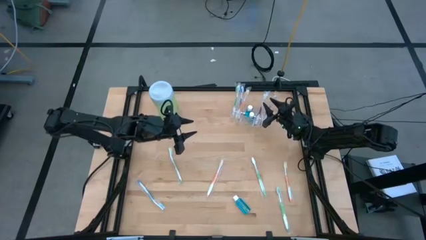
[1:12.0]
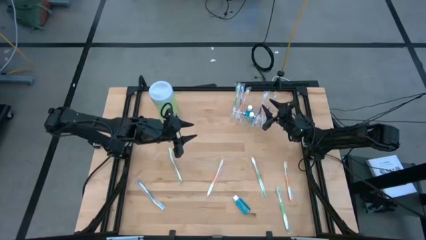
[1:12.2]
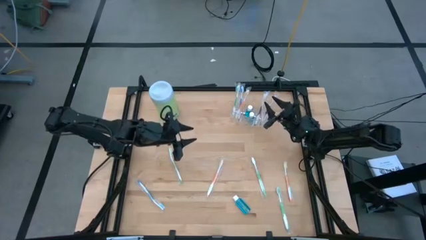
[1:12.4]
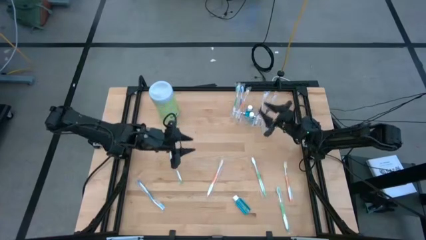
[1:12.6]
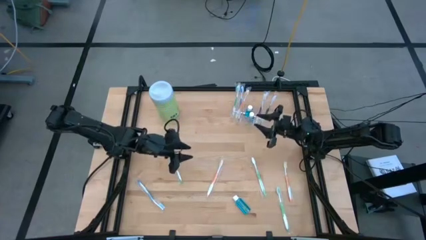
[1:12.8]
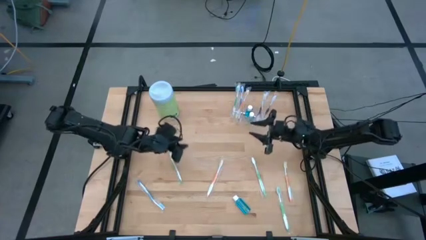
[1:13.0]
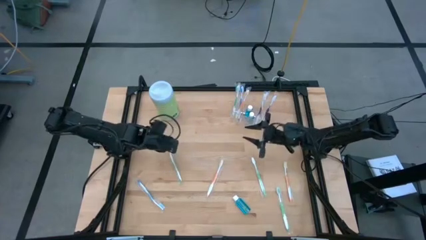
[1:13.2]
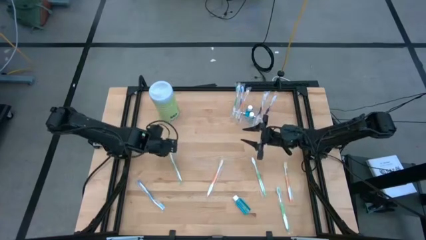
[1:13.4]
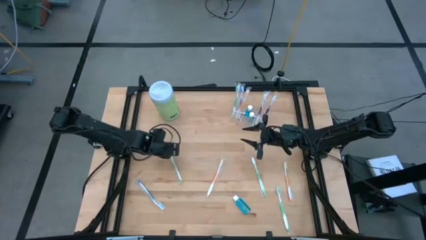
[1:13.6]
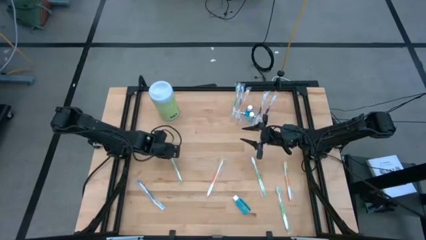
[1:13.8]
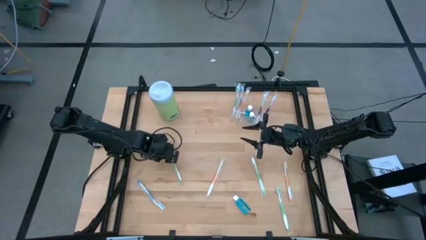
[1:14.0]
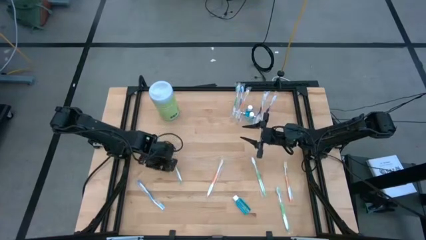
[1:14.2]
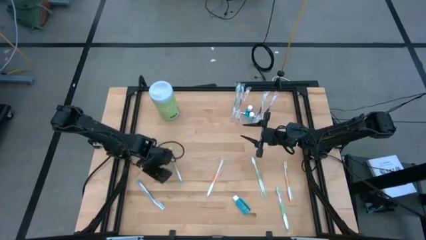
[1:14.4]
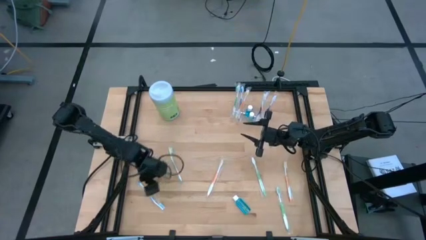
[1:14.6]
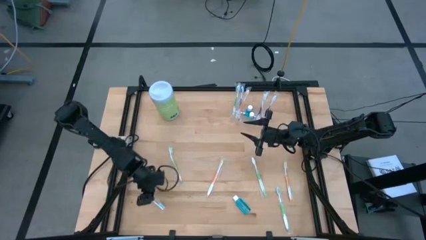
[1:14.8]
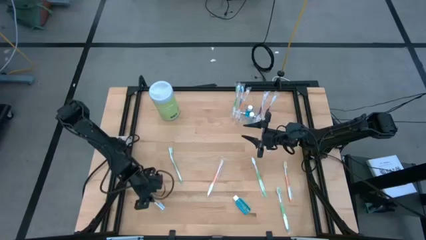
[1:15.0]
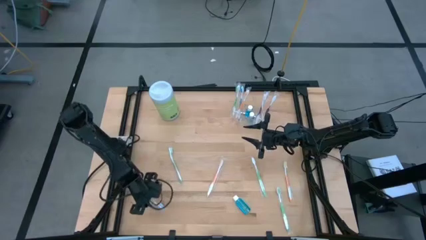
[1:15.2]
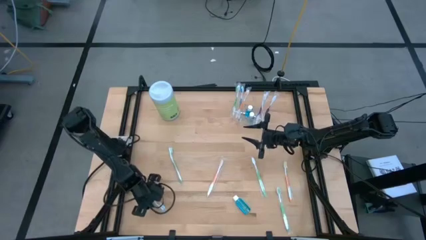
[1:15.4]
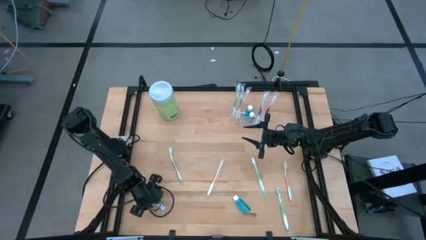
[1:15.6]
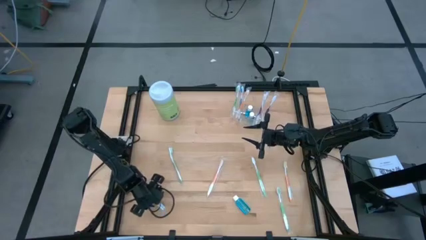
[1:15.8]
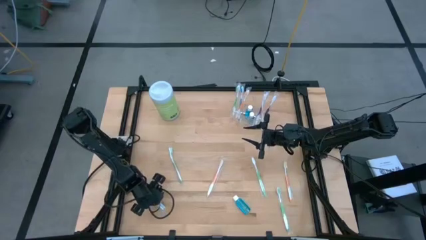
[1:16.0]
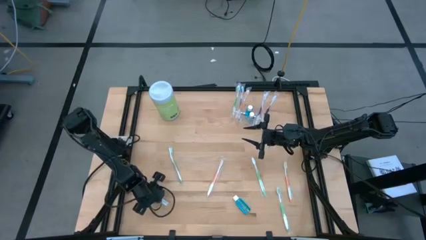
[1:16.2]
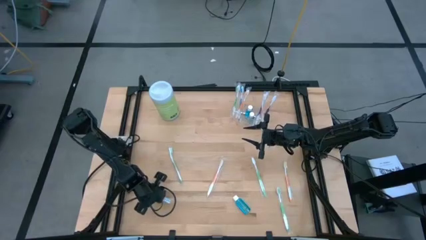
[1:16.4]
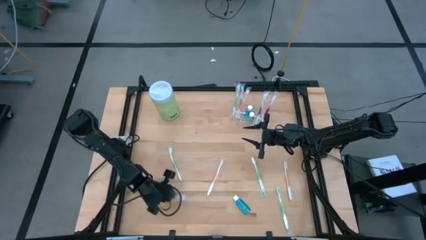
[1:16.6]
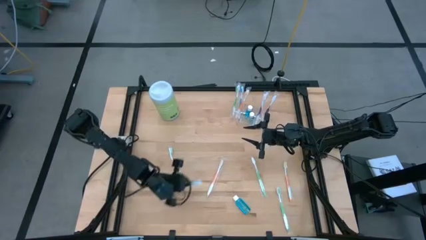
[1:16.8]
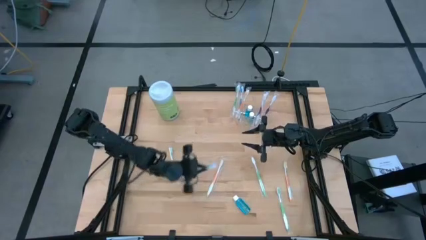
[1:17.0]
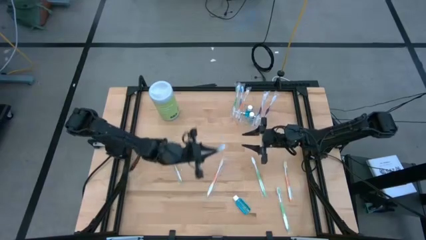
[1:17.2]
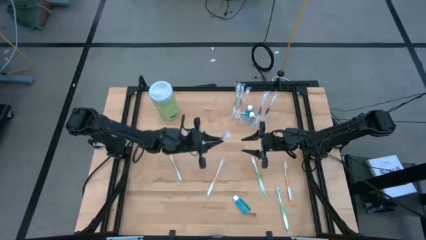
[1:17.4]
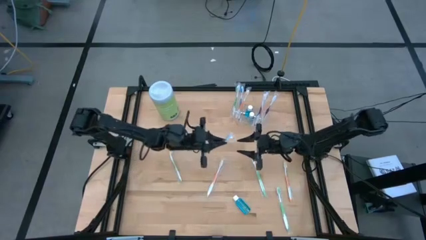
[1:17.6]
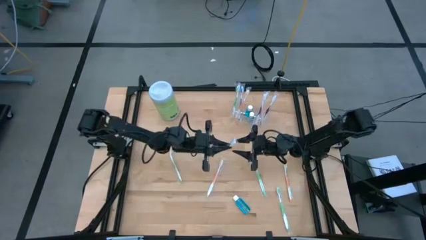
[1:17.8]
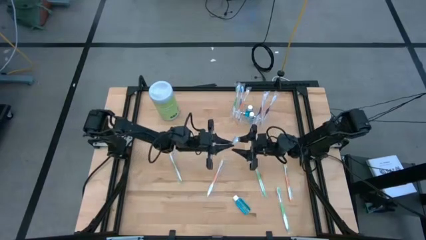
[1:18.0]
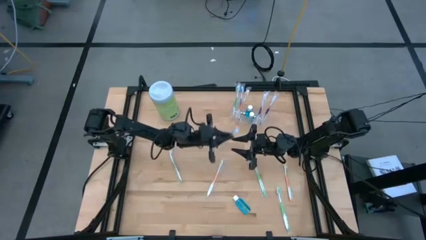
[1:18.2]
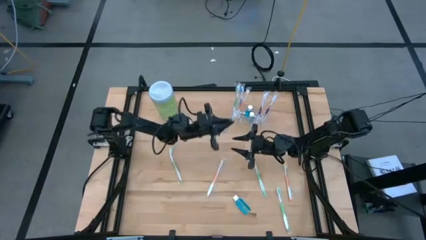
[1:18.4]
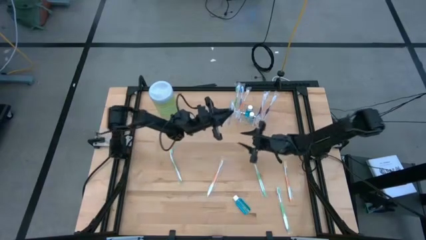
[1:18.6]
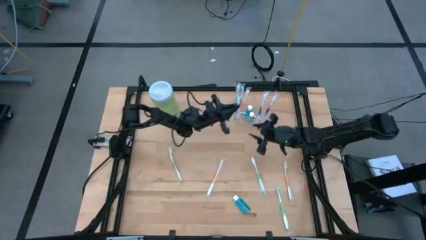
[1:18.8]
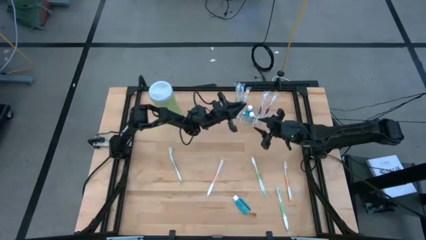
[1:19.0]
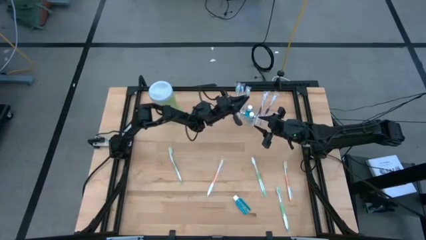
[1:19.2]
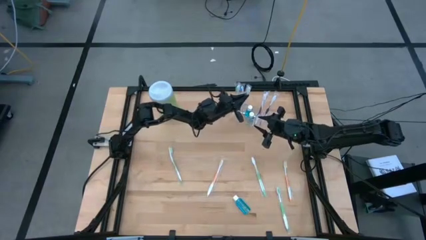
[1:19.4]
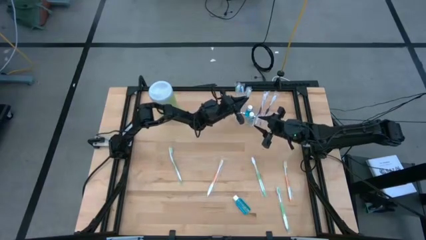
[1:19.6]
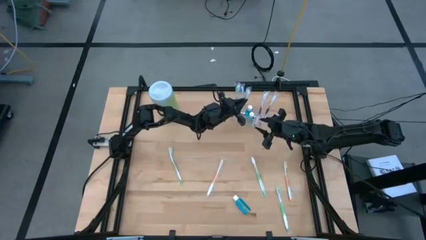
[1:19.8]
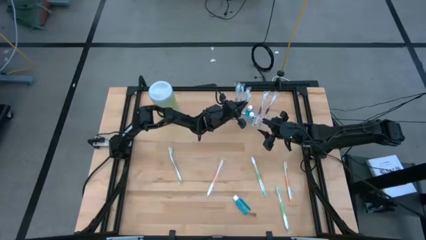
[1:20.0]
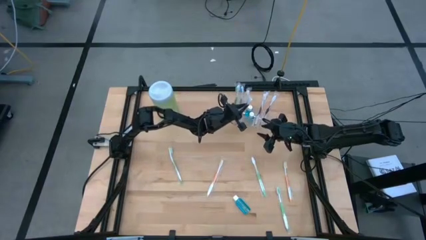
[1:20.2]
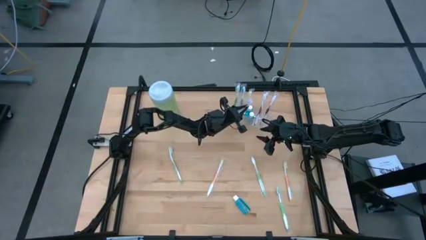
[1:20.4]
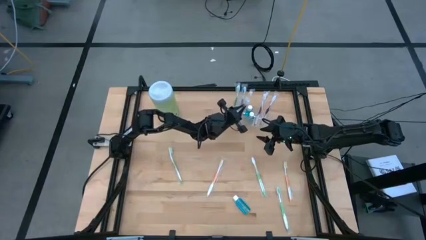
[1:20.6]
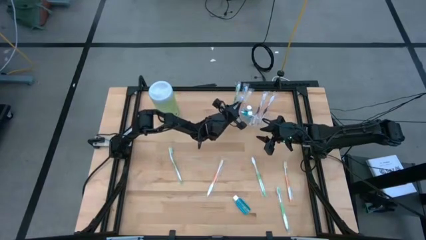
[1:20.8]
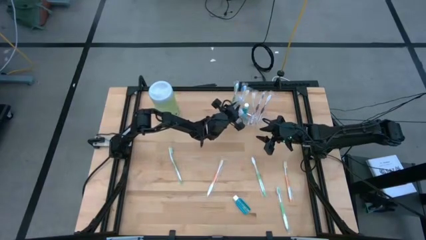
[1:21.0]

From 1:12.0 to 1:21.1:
Task: Pick & Place toothbrushing station
Put the blue toothbrush into the transparent organizer

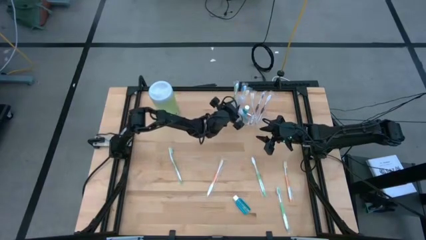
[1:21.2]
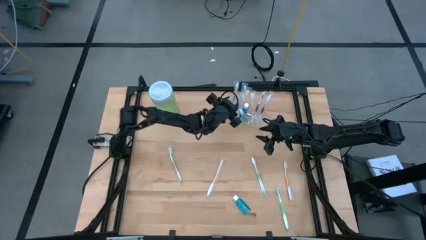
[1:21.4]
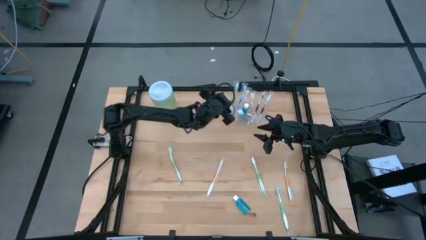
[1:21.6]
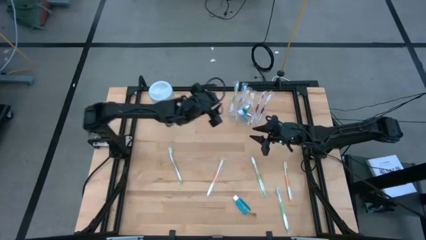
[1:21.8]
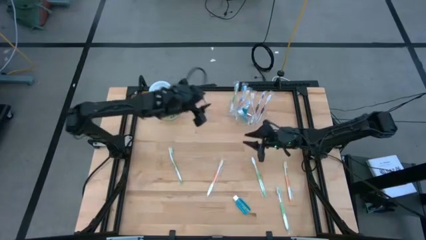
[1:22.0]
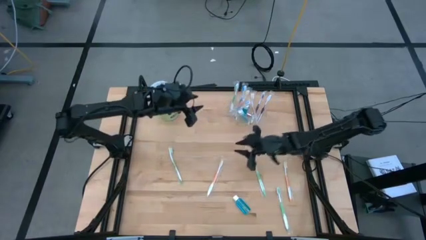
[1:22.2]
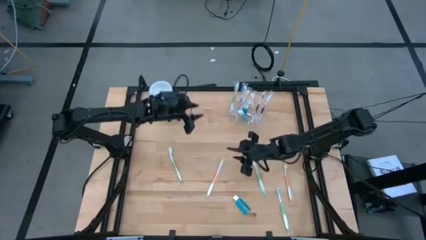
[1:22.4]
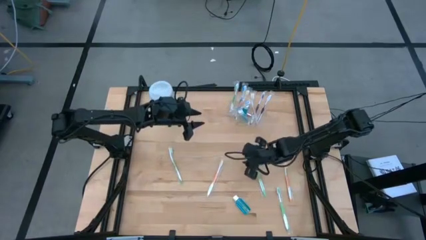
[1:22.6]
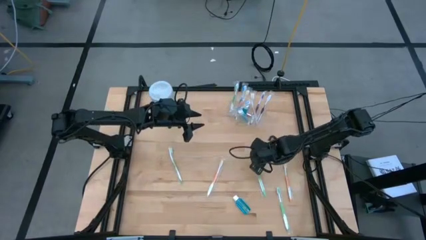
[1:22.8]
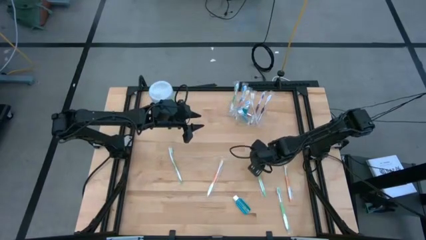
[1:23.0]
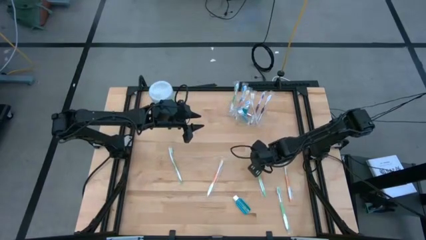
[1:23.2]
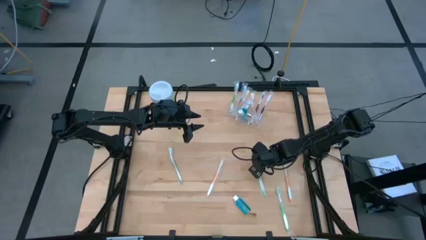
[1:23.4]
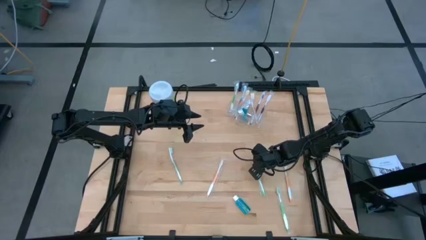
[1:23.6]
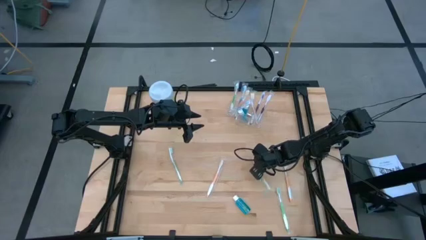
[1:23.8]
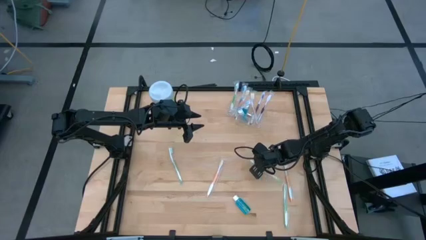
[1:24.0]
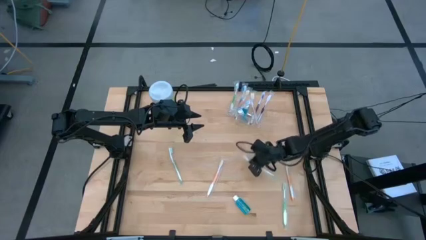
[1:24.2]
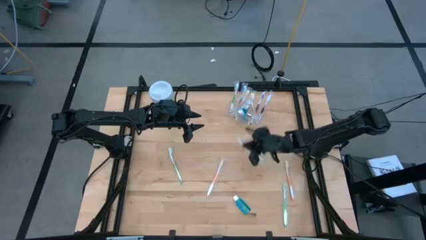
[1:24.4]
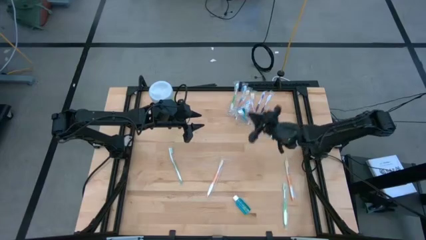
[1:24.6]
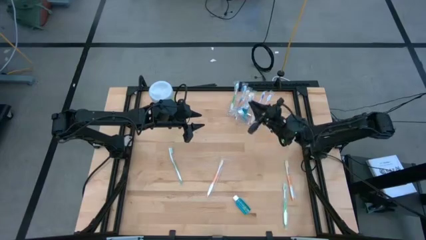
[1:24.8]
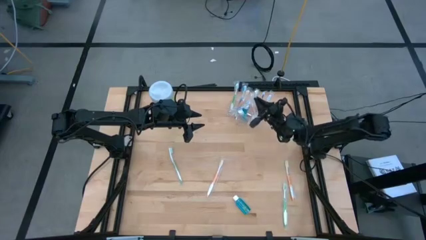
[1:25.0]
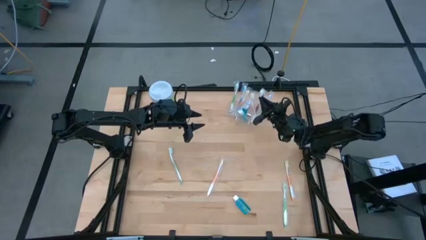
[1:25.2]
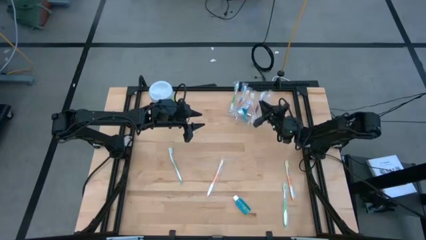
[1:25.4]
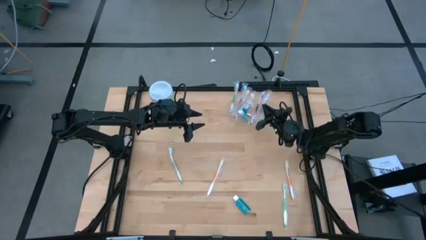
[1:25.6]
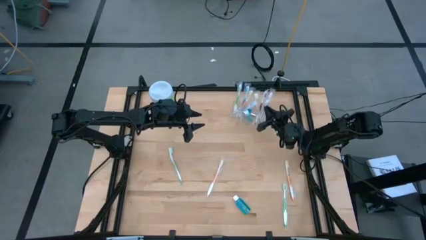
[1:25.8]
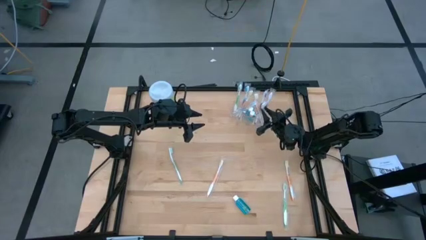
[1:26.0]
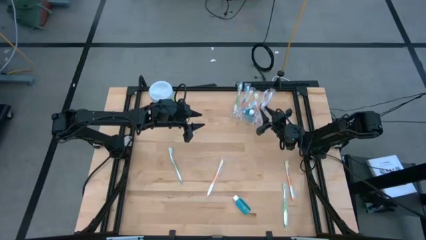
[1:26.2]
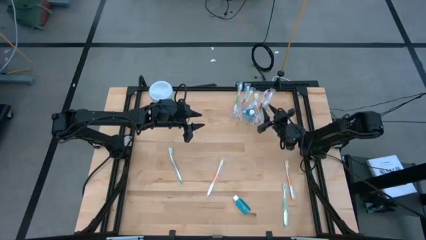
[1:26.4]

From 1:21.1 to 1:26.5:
Put the green toothbrush into the transparent organizer

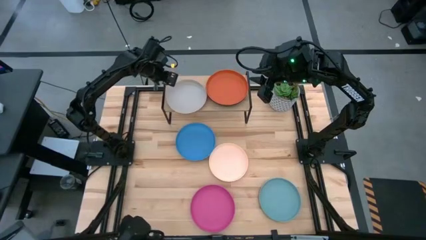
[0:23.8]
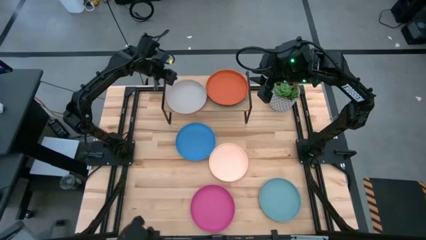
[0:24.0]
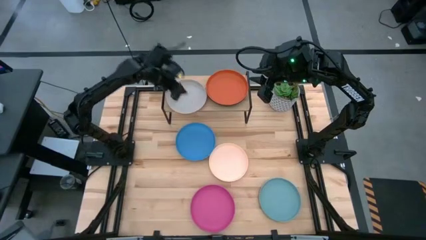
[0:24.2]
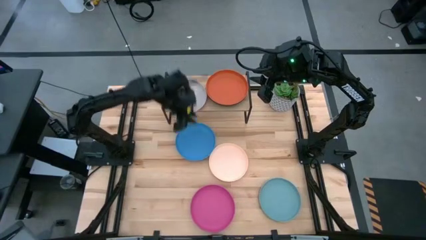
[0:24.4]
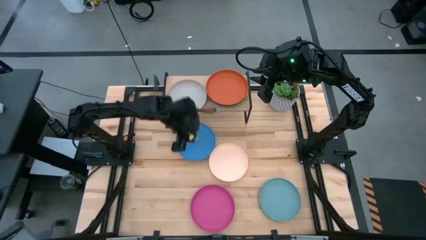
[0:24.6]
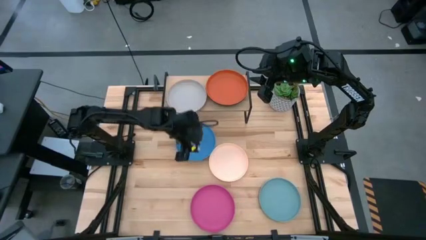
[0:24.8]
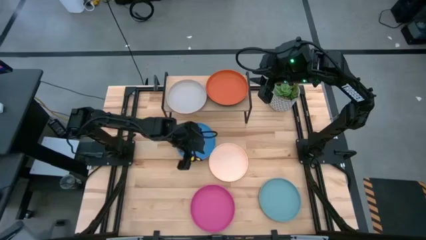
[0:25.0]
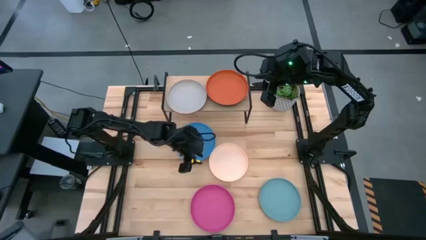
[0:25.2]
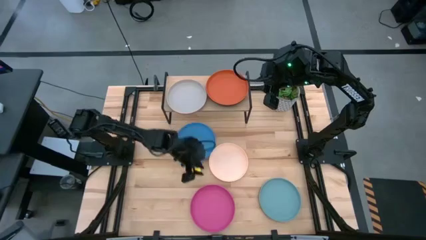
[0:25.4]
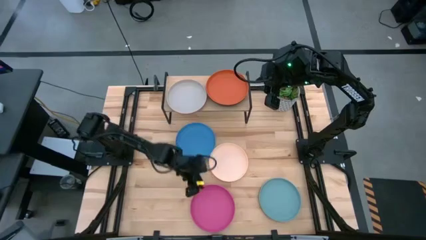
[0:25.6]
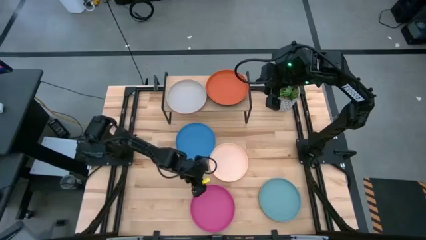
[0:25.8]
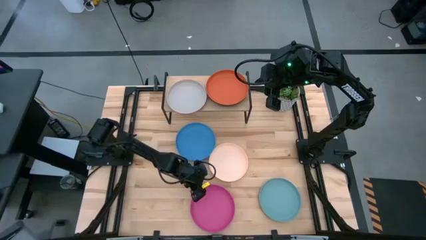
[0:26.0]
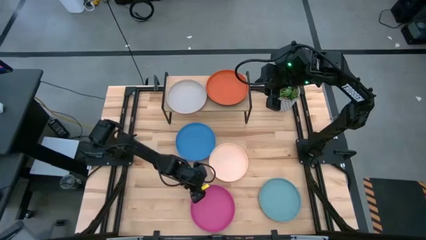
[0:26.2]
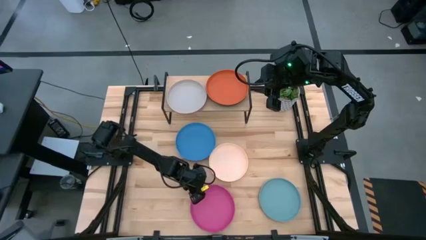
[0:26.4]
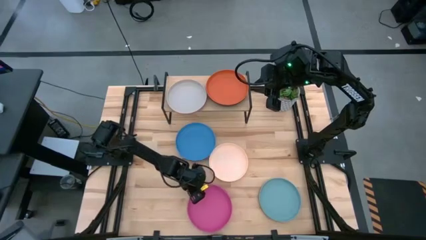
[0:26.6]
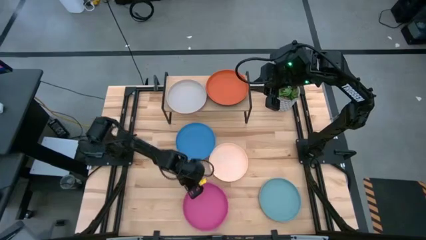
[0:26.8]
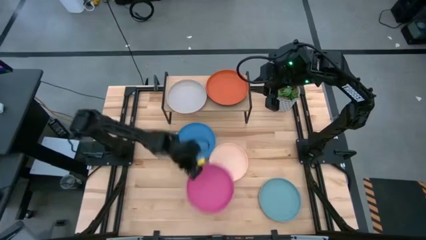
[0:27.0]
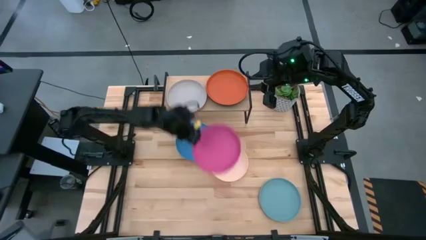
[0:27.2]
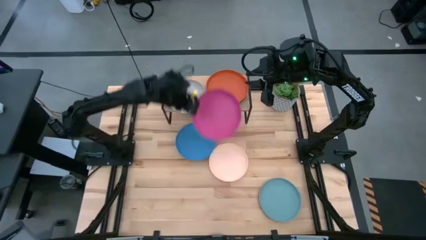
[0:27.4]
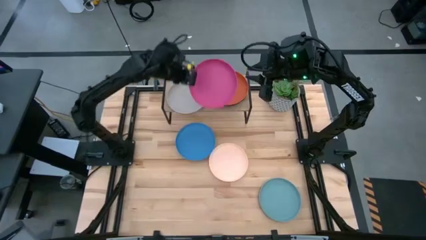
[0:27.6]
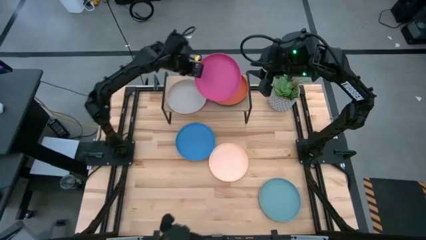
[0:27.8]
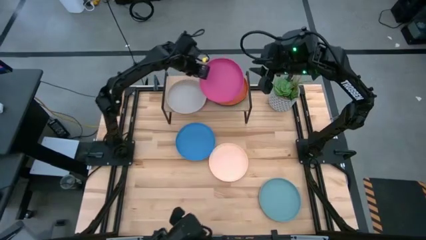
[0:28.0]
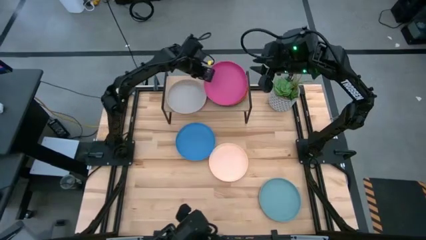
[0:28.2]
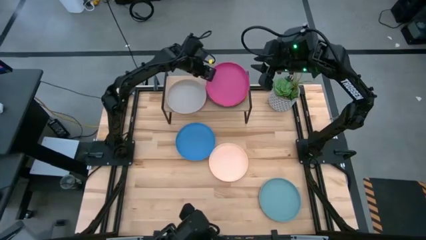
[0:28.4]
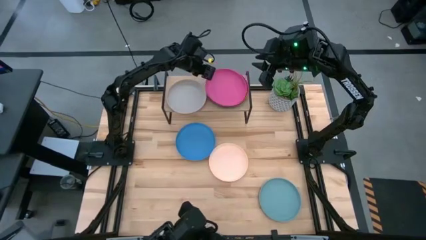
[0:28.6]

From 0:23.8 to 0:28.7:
Task: Place and stack plates onto a shelf
Stack the pink plate on top of the orange plate on the shelf
